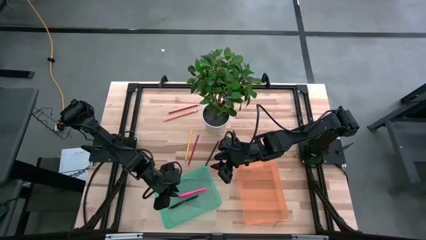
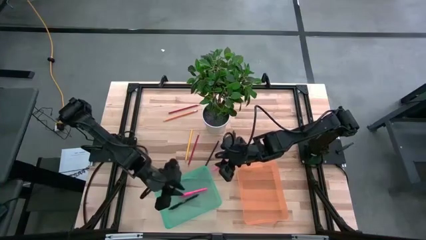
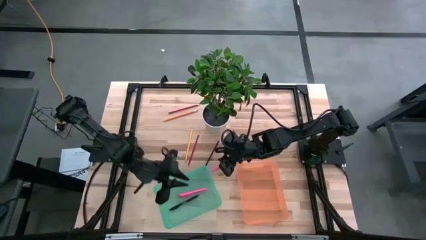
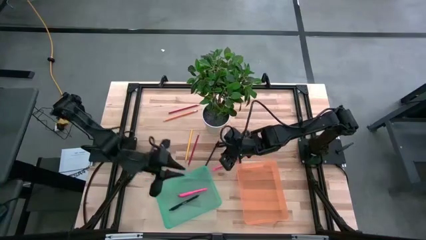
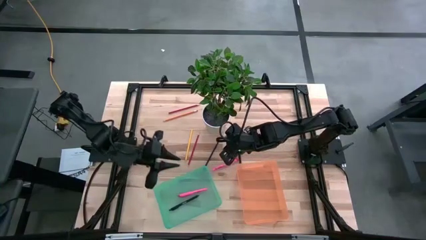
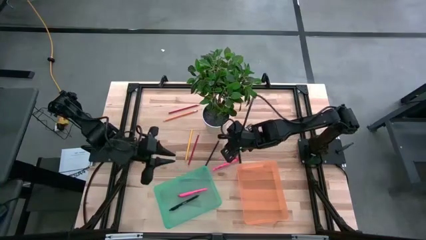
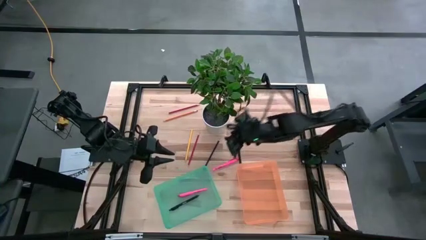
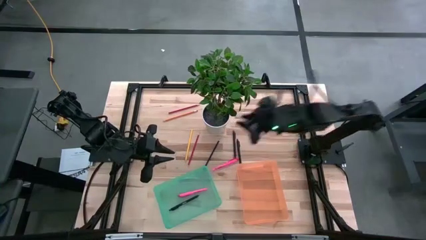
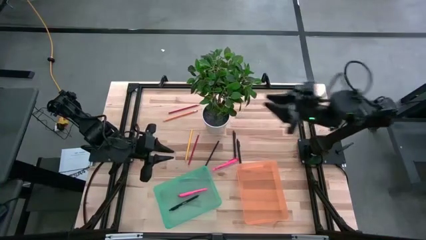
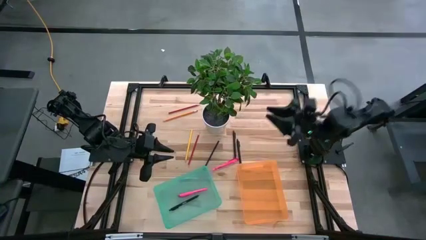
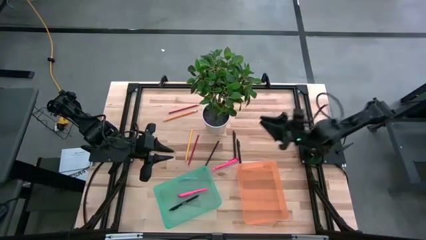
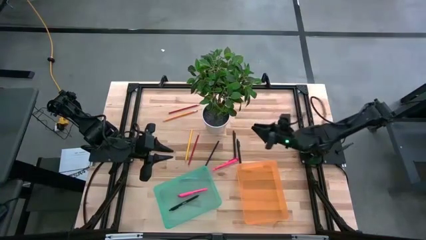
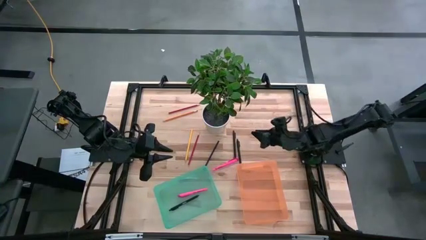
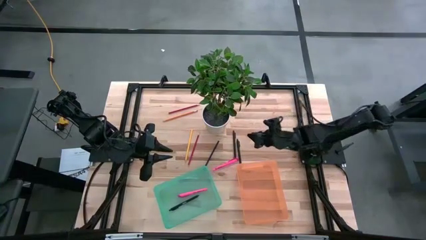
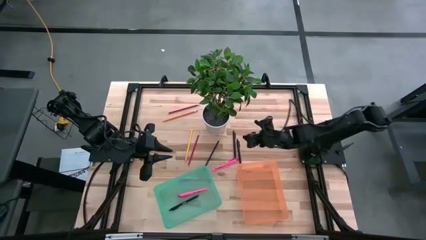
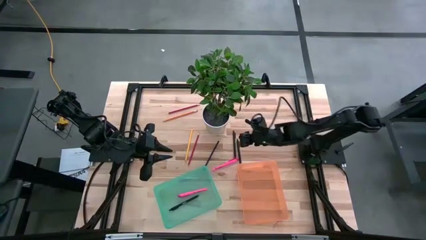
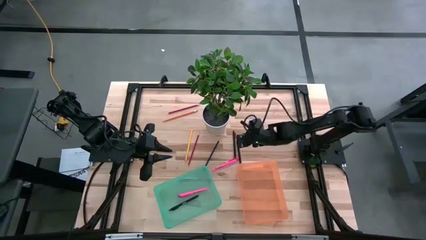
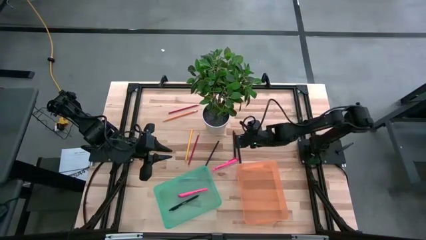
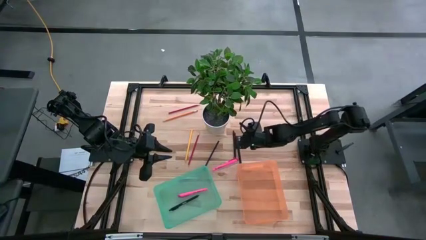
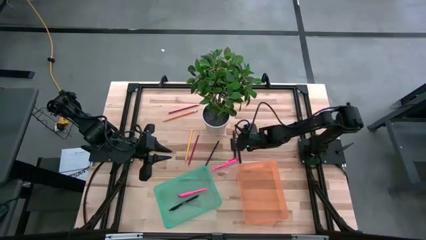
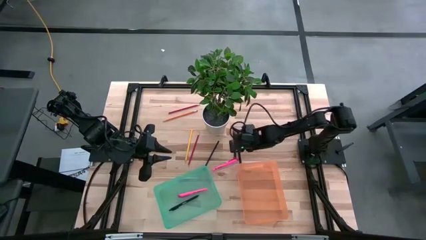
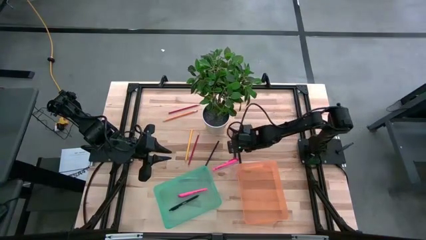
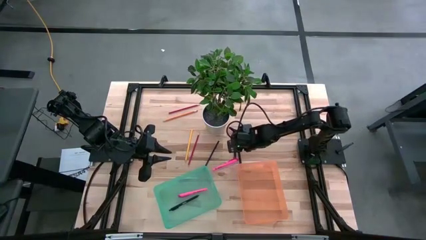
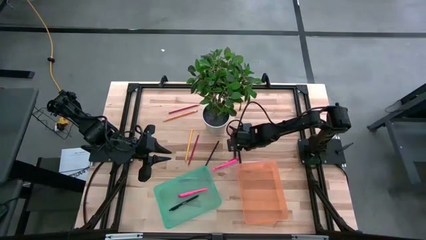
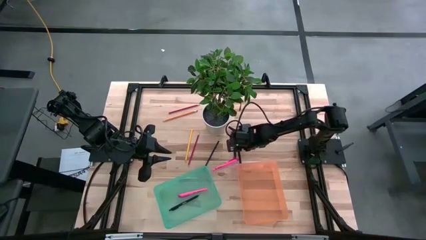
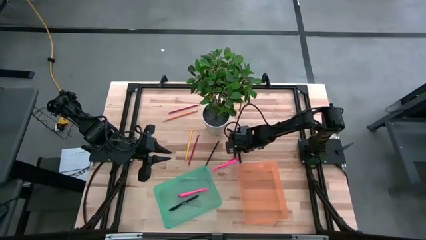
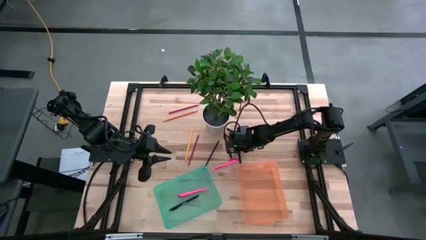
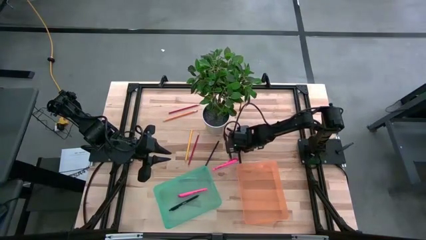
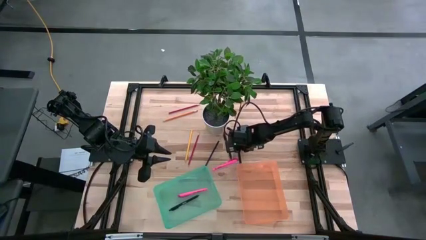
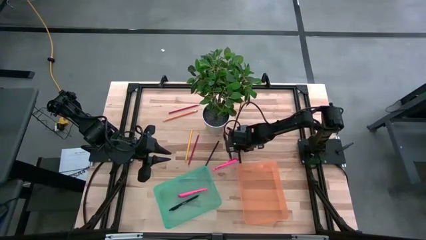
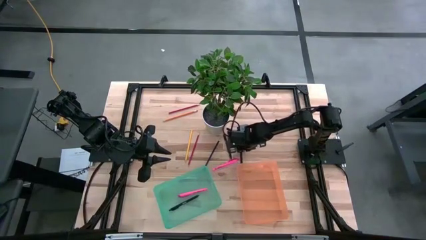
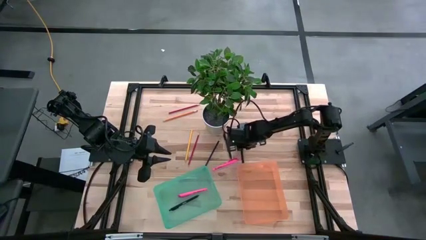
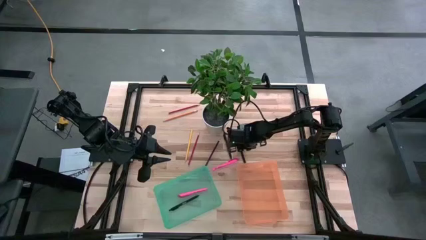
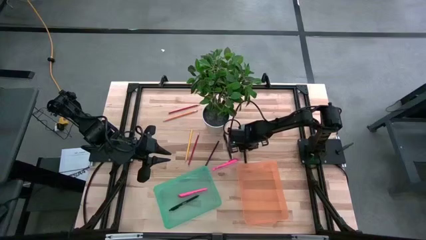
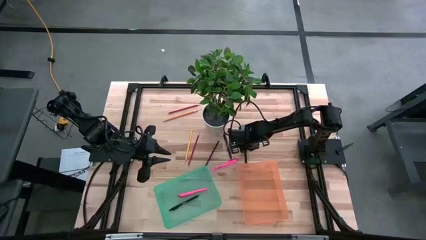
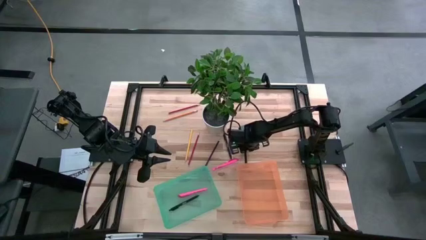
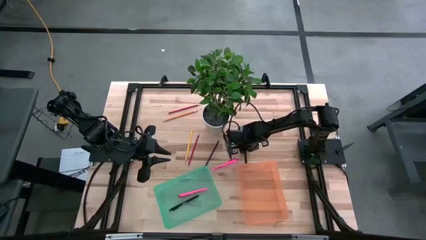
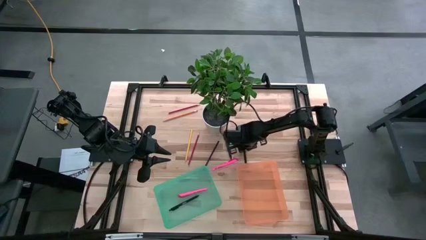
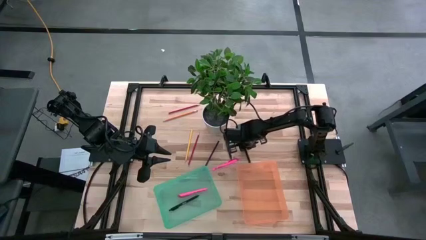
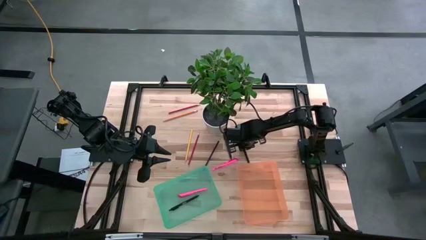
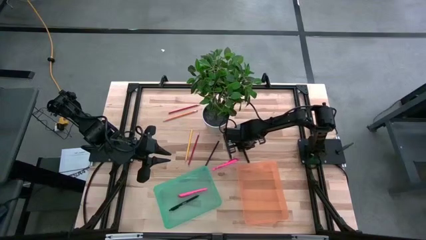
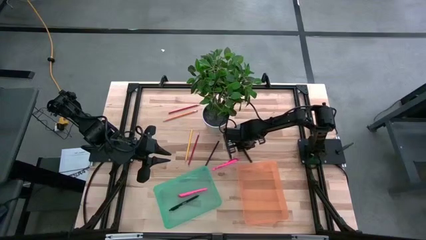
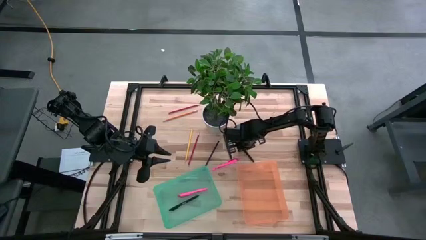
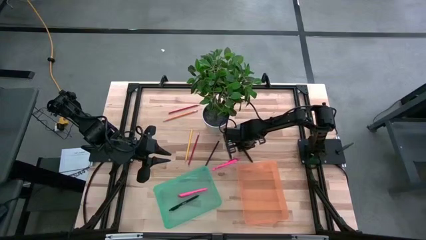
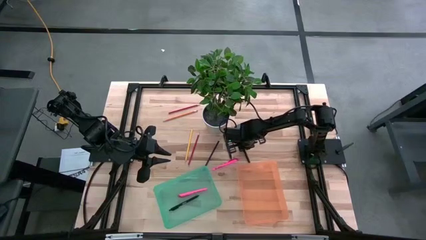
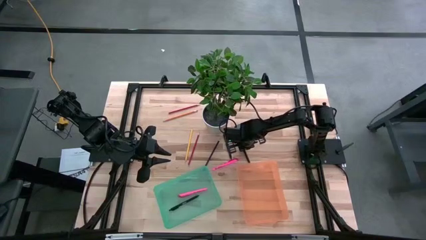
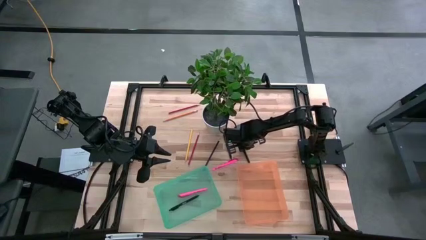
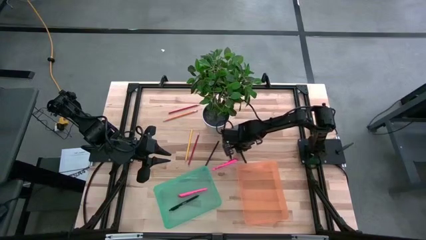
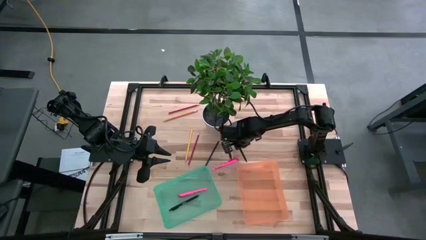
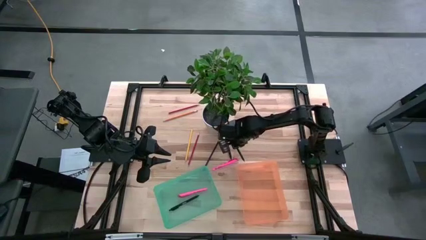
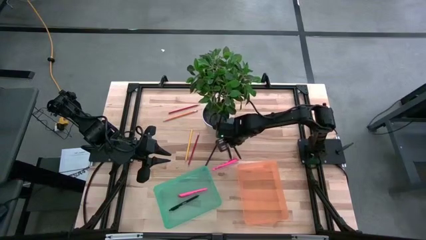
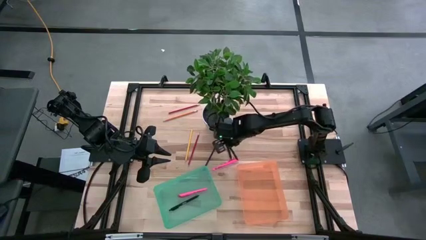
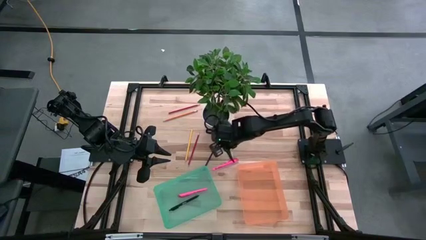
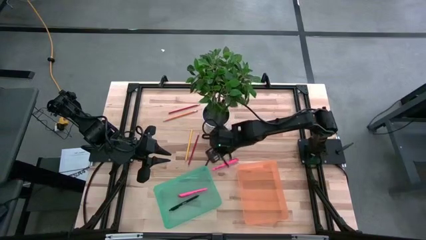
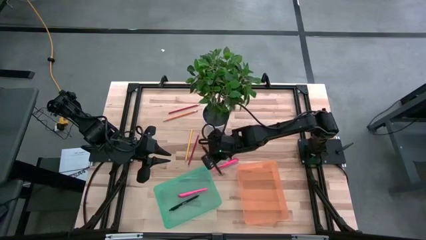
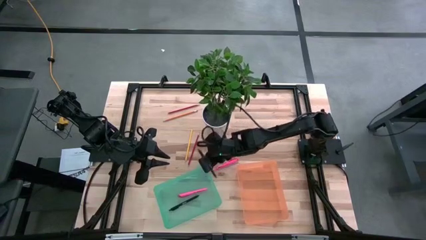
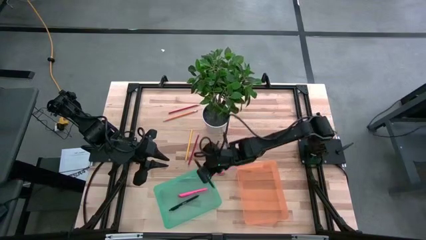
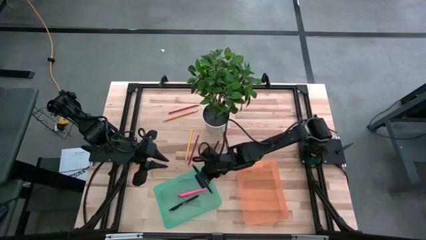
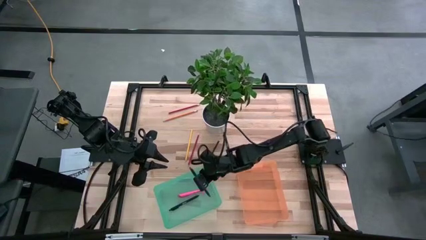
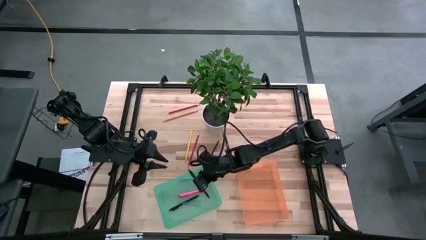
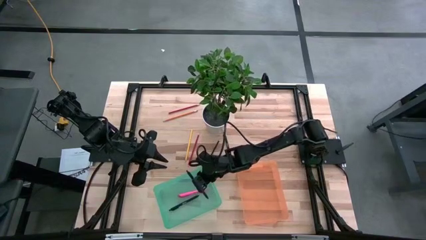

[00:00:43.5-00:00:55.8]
Task: Sort pens & pencils
Put the right black pen into the green bin
